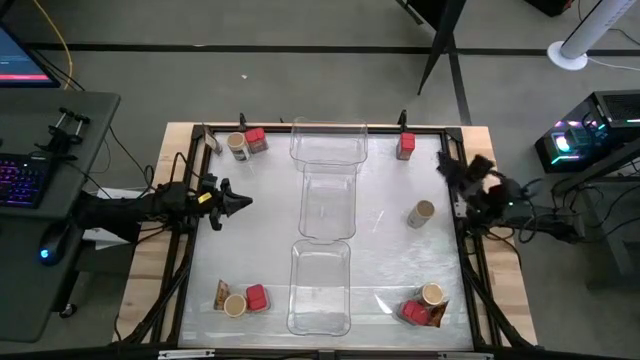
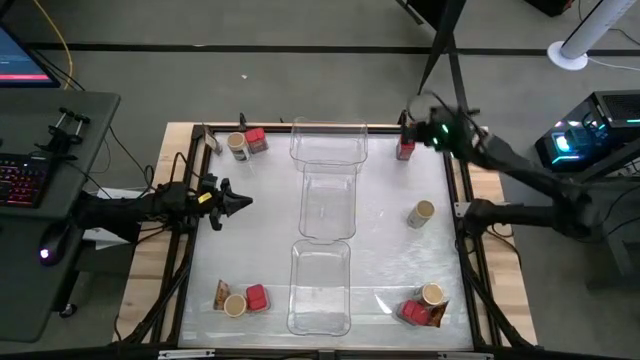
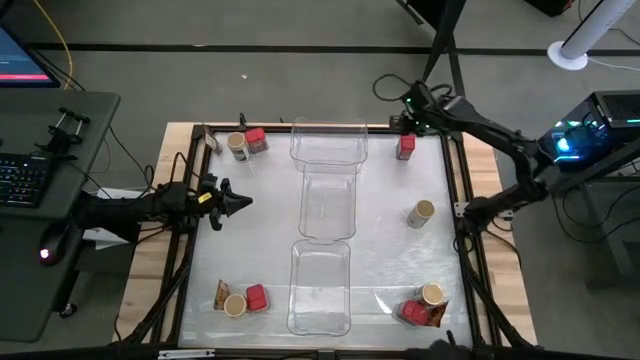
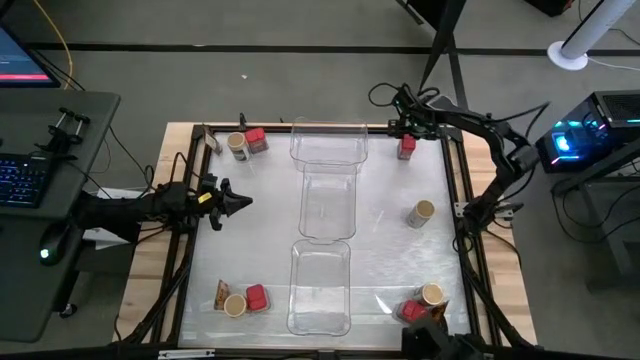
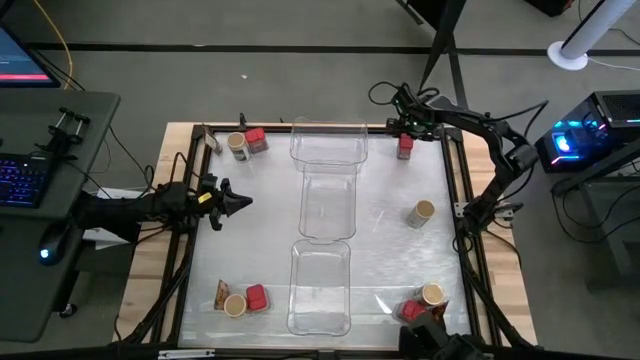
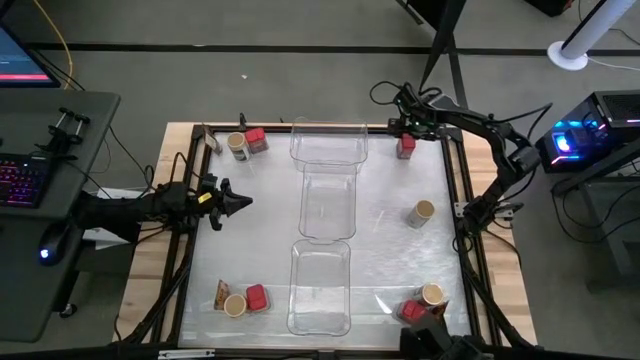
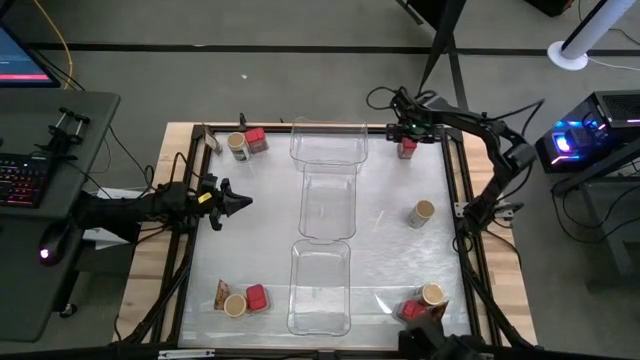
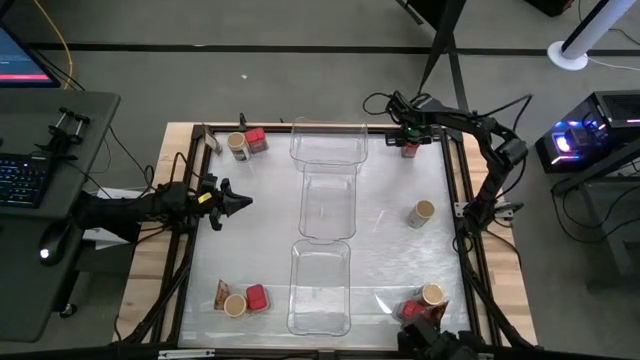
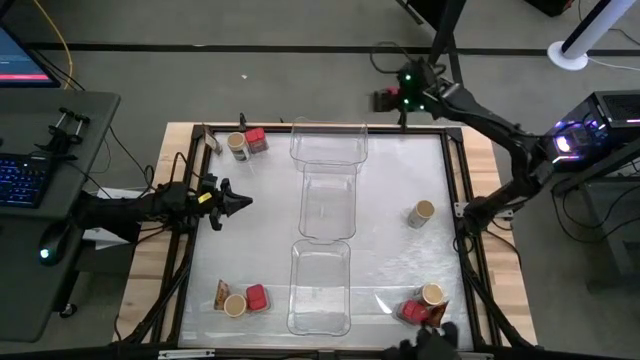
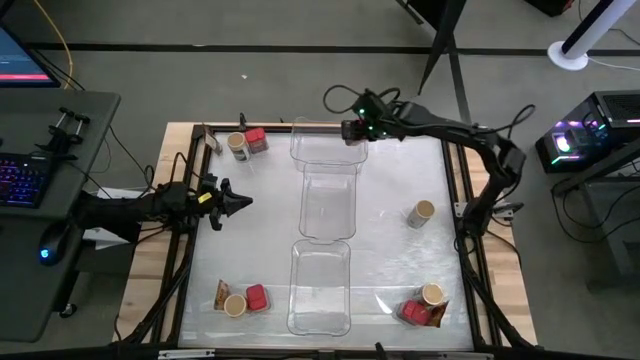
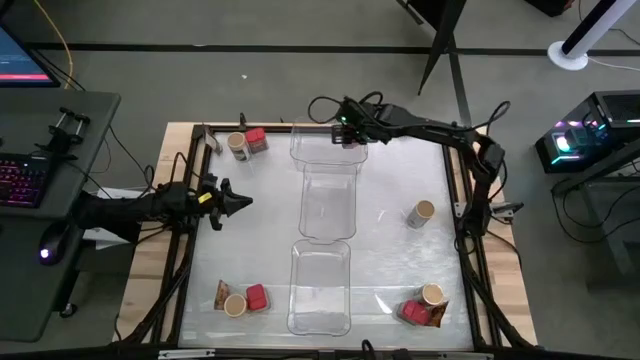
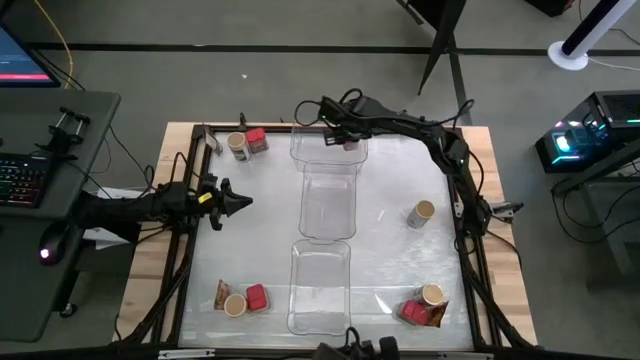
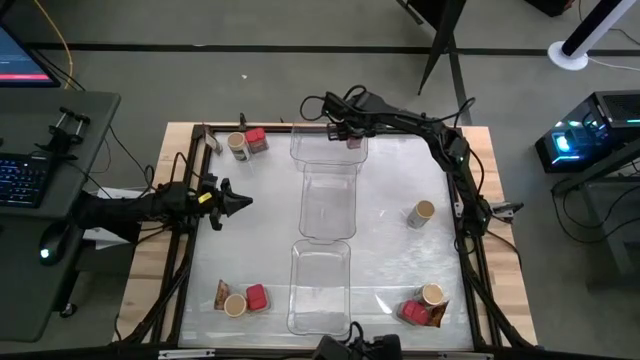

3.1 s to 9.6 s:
Task: Sort spices by type
Put the top right red seasoning can into the top transparent bin

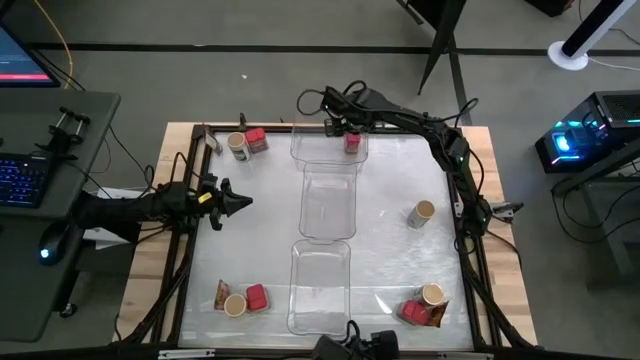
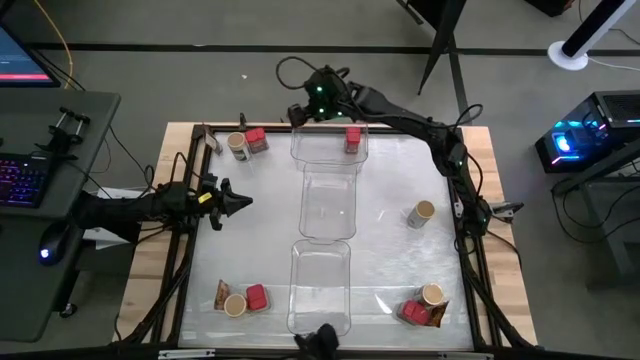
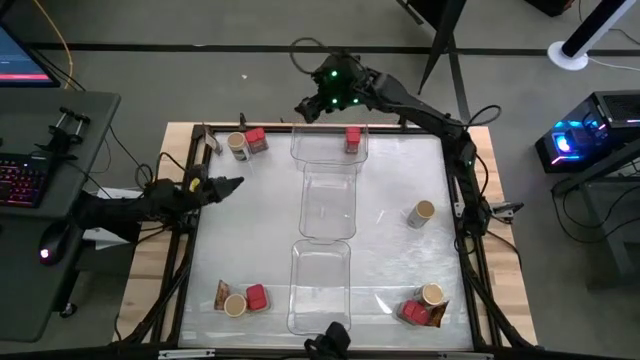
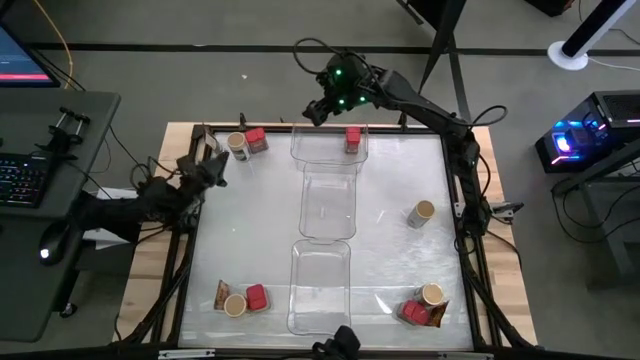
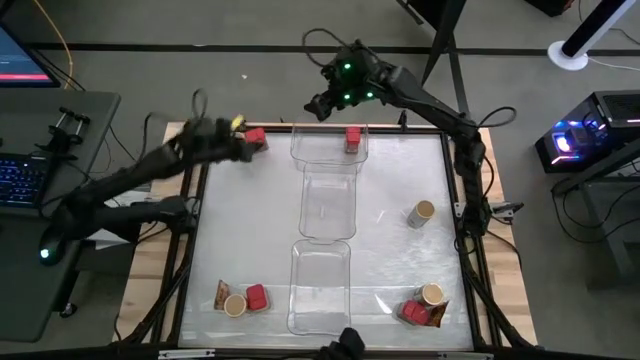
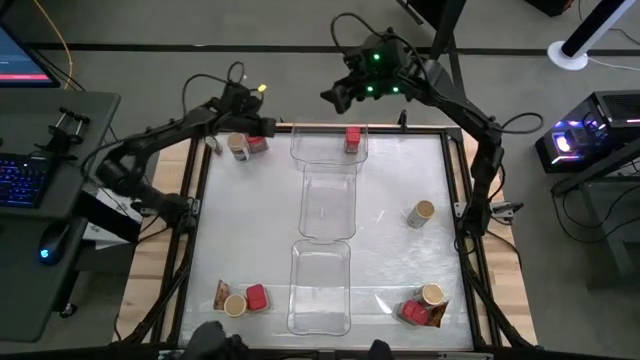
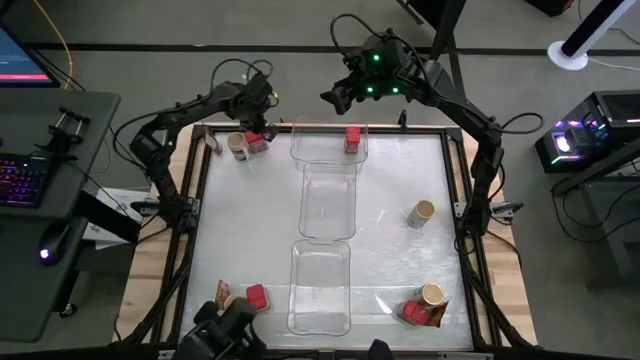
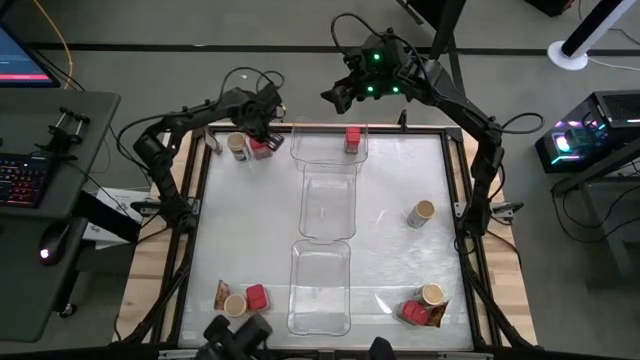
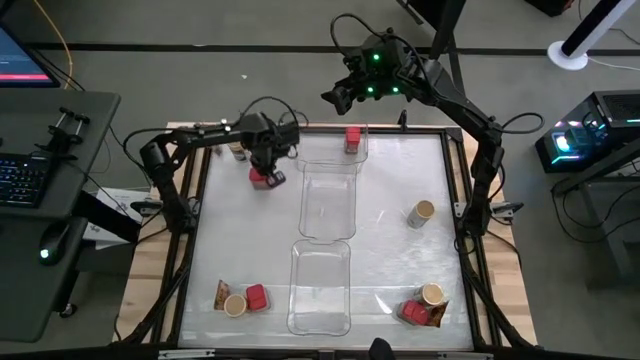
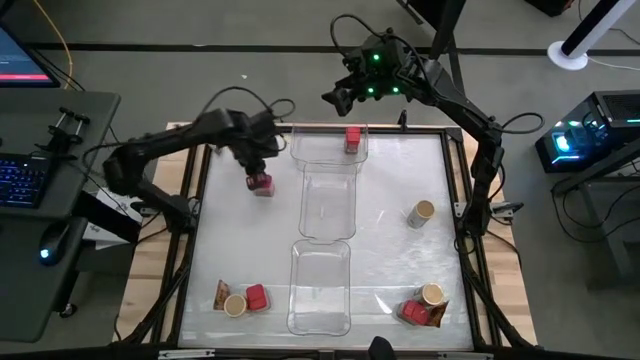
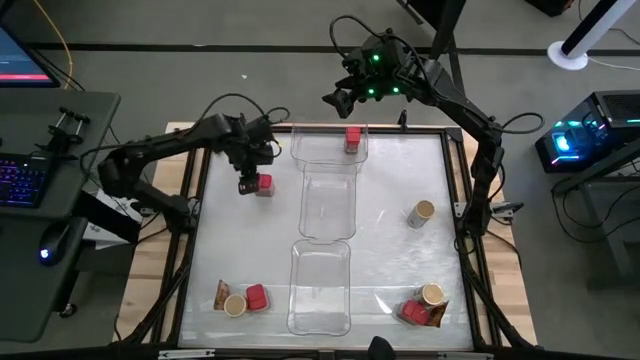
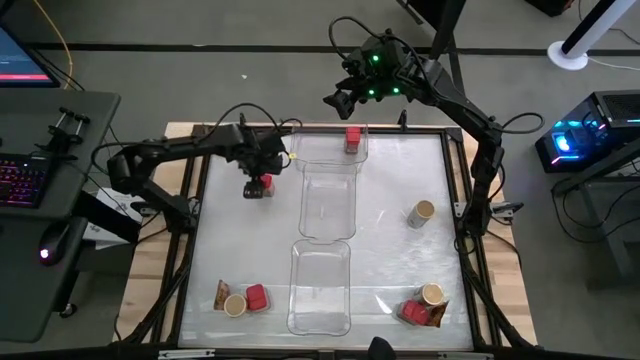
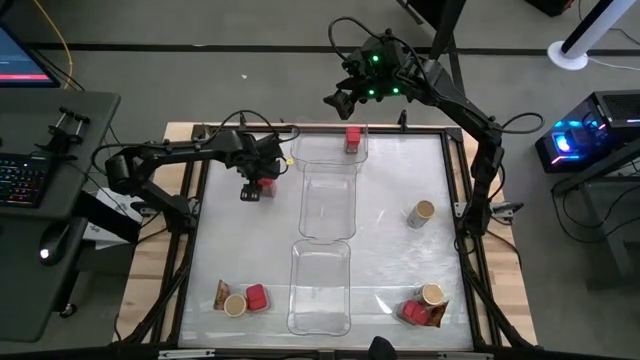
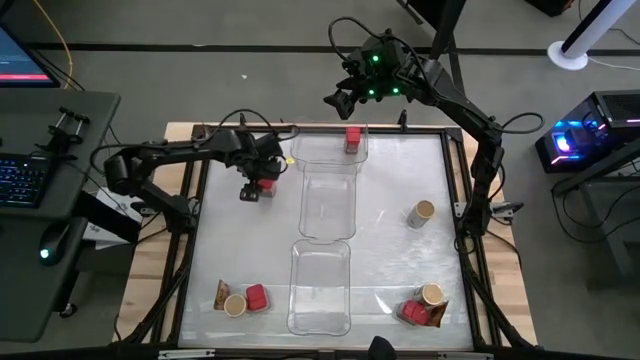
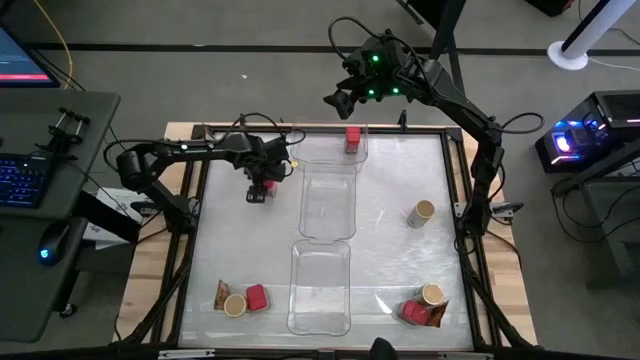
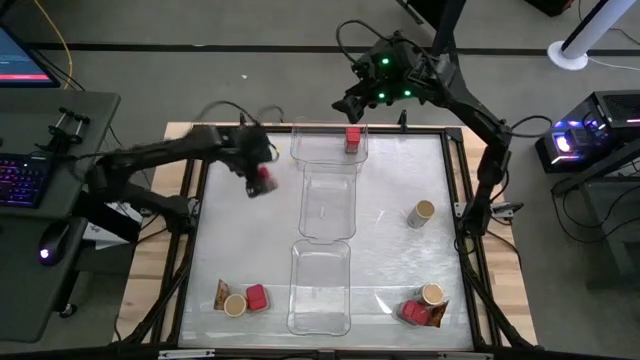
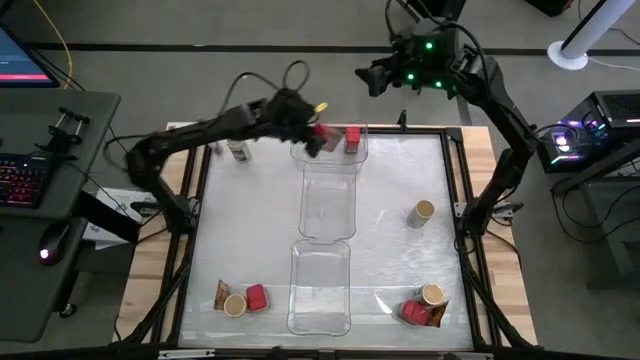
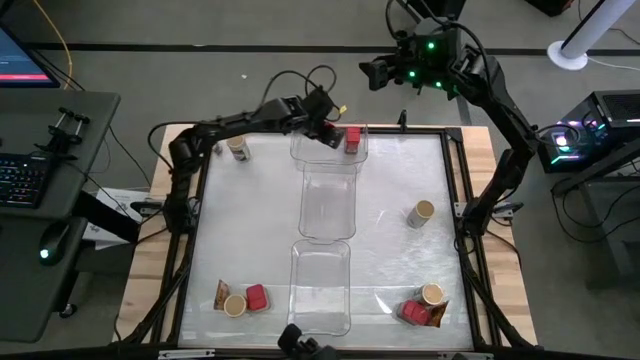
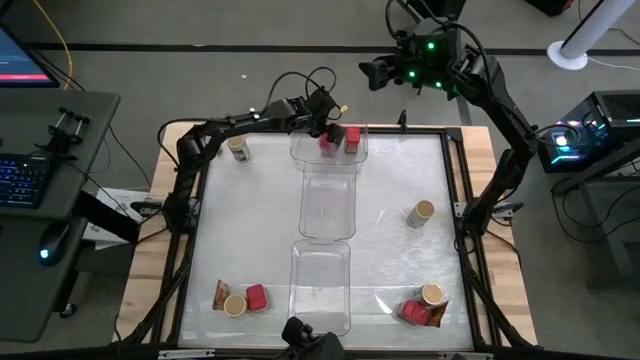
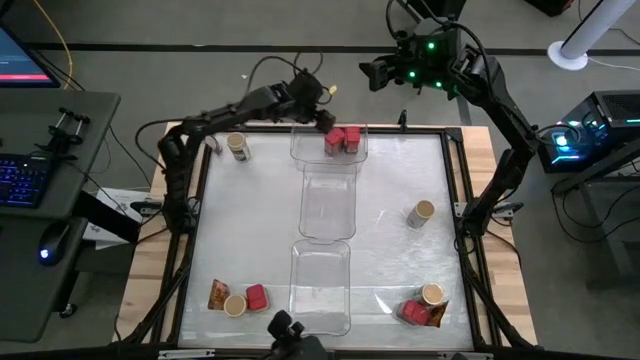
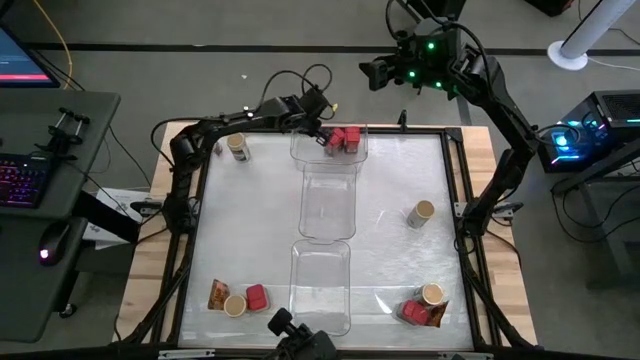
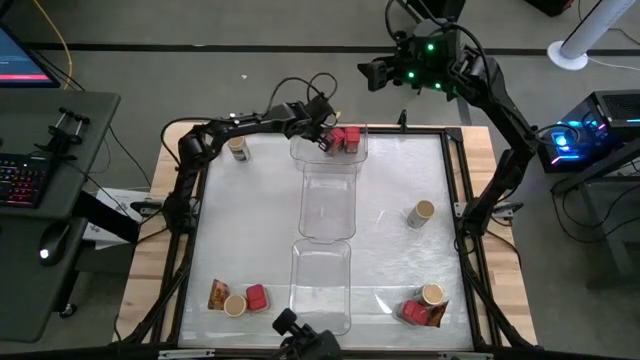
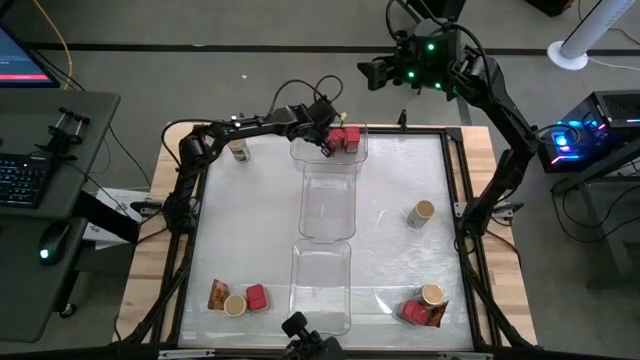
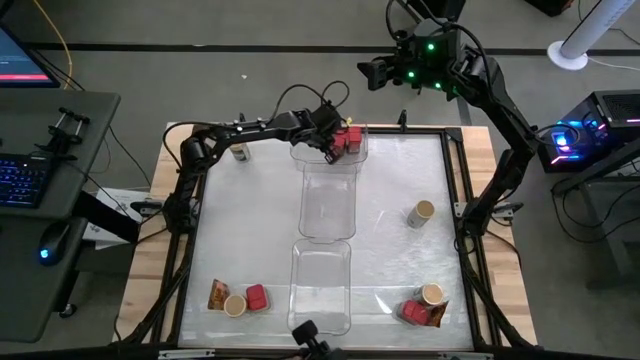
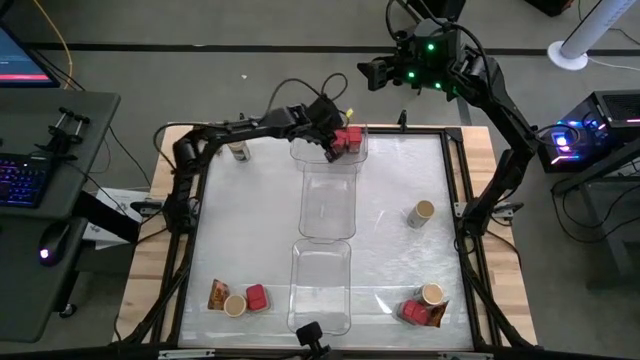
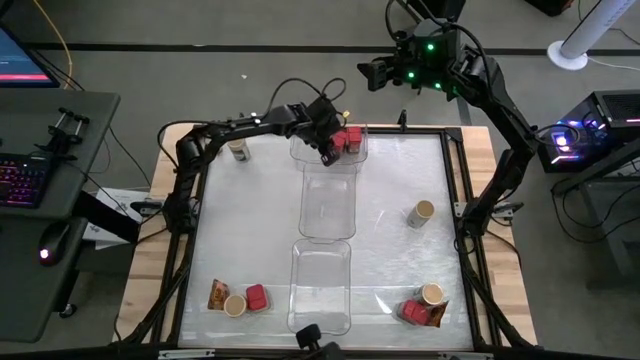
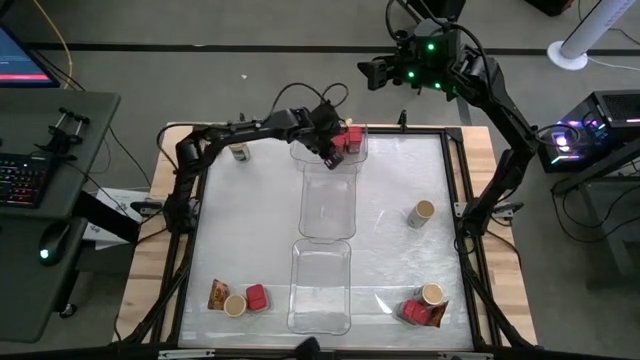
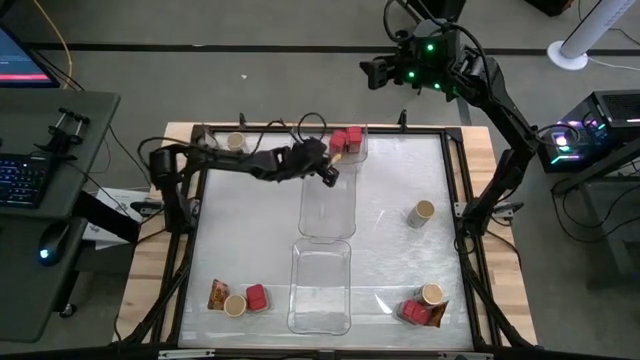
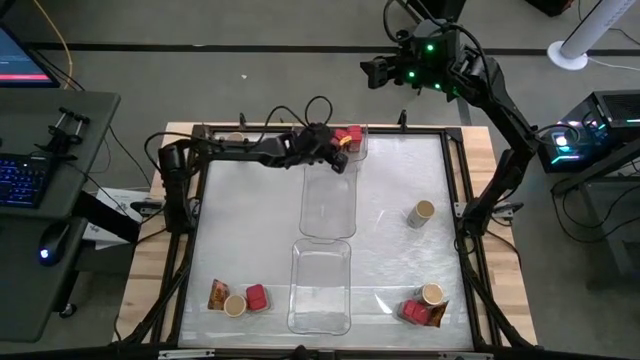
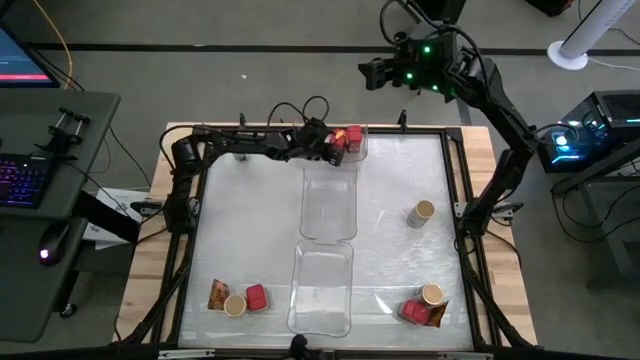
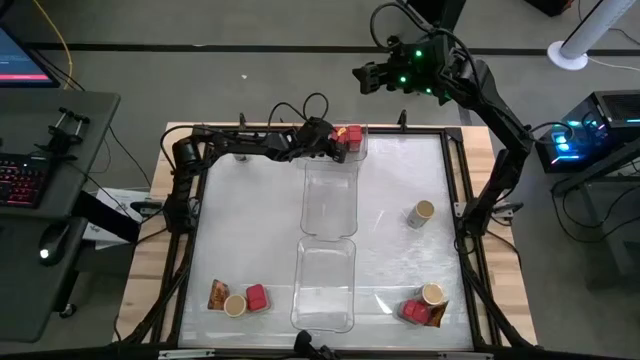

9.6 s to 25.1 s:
Put the top red seasoning can into the top transparent bin

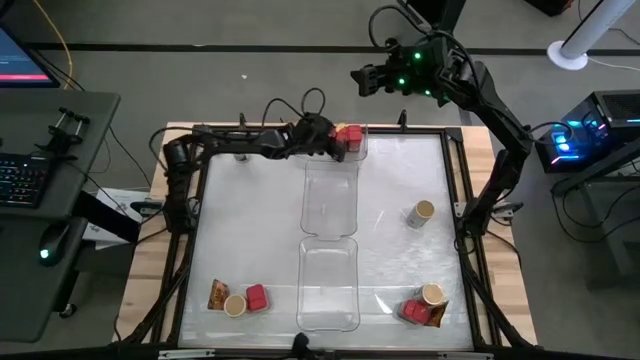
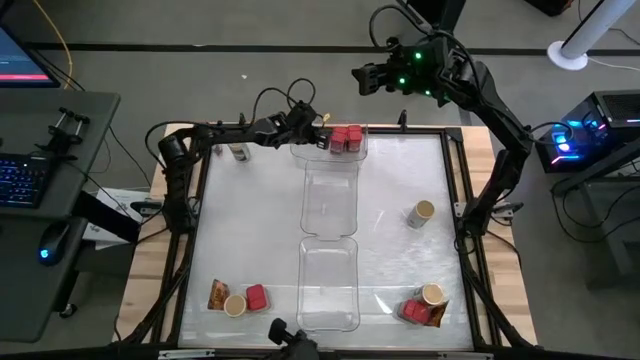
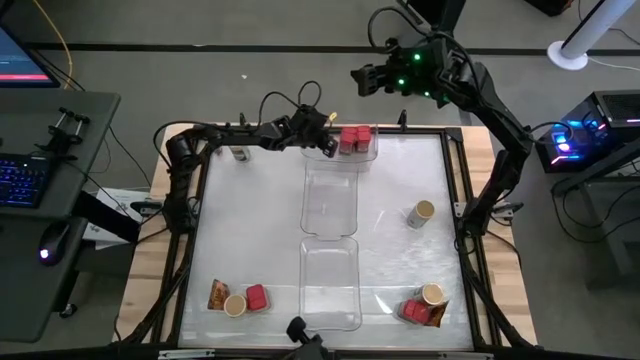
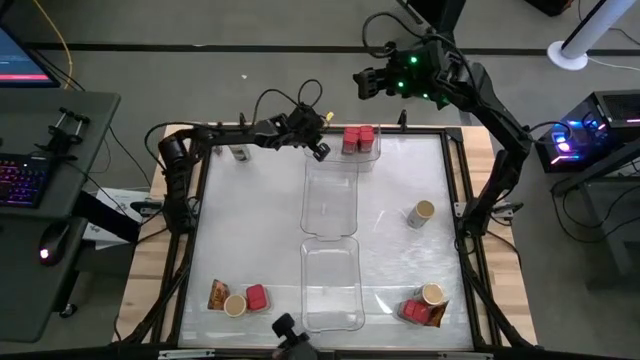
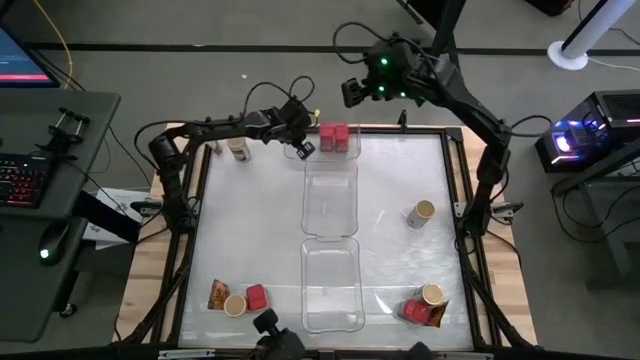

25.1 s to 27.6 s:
Adjust the top transparent bin
